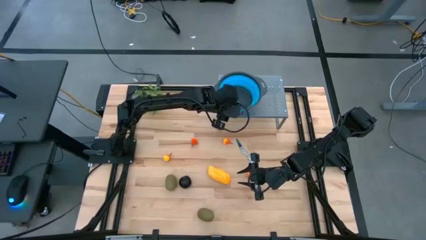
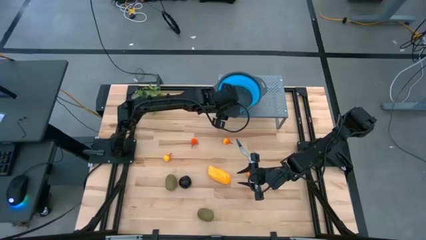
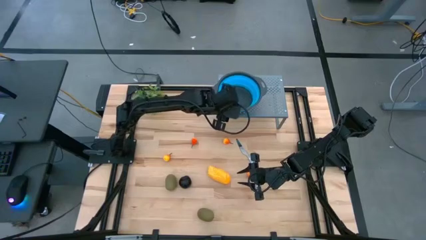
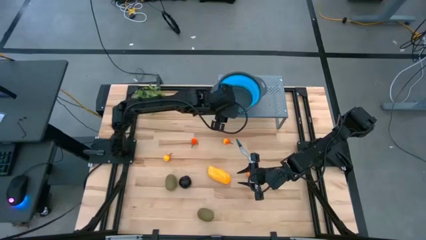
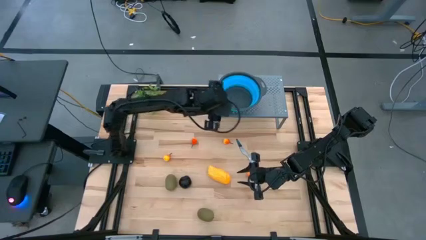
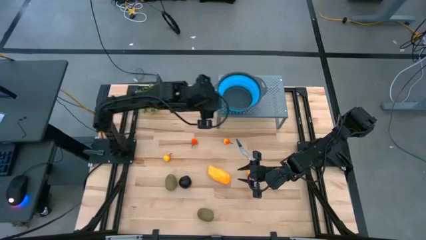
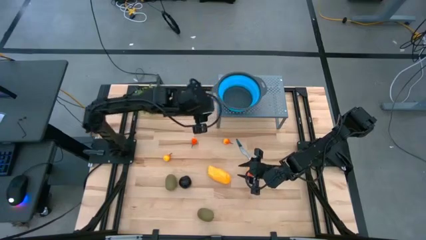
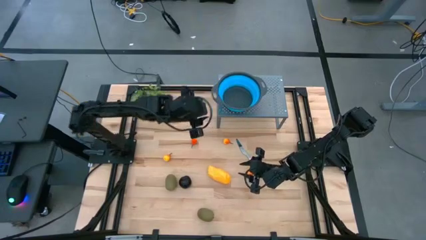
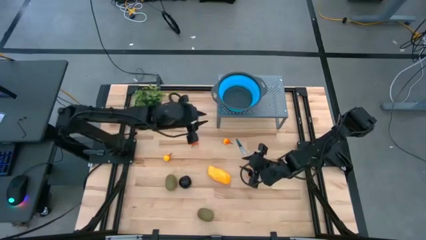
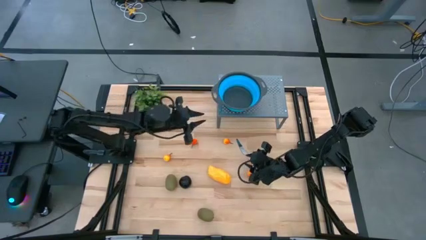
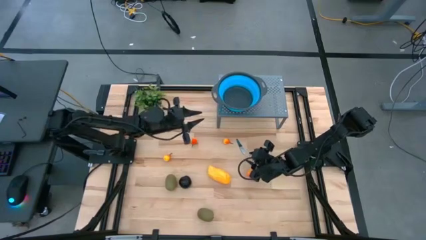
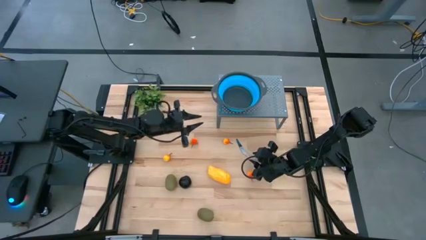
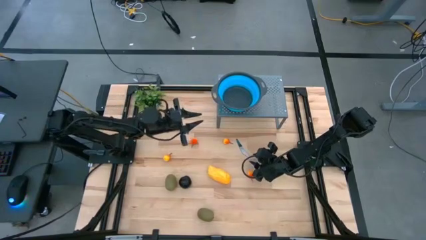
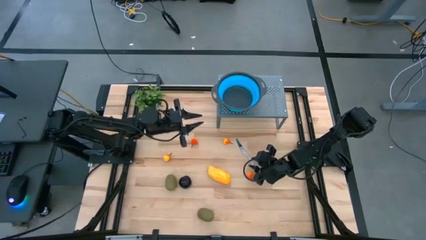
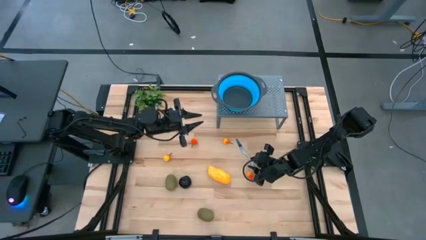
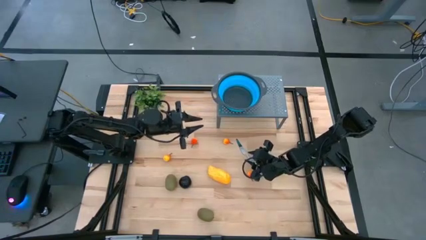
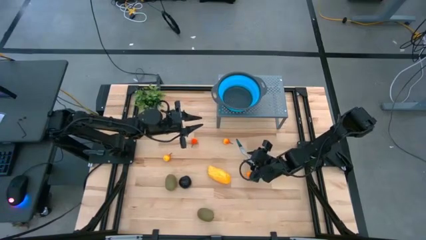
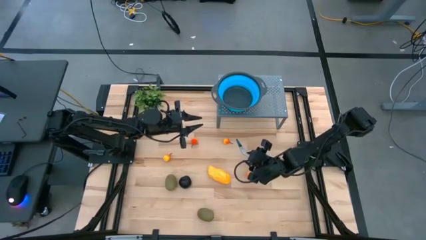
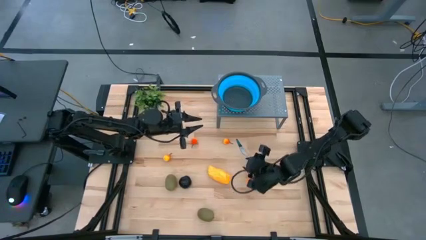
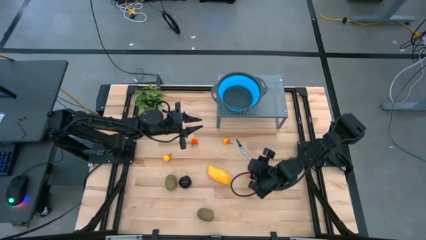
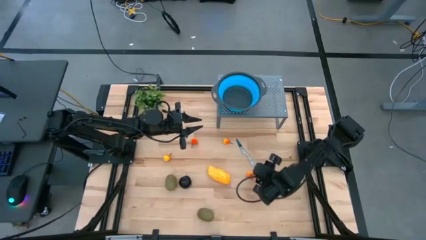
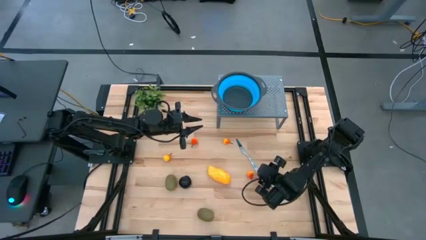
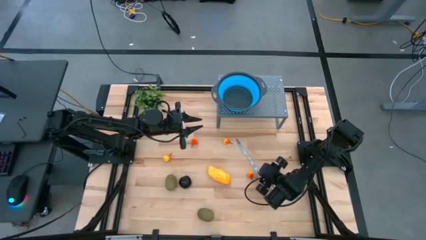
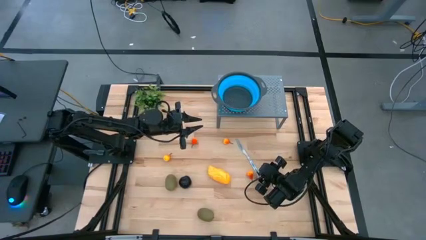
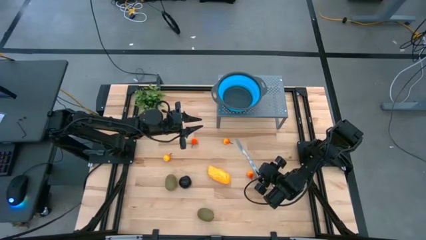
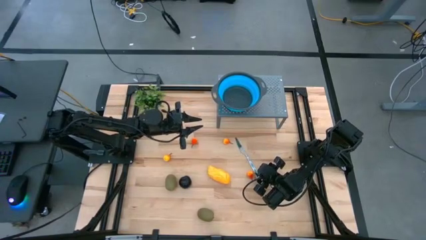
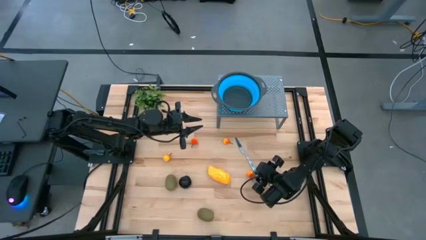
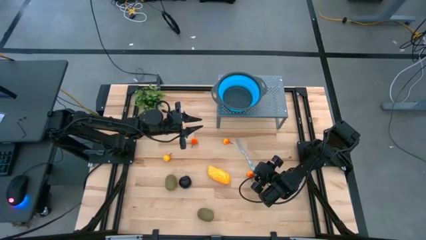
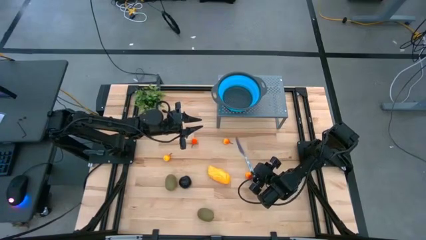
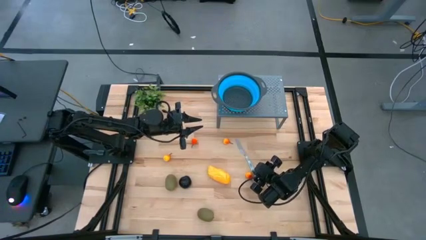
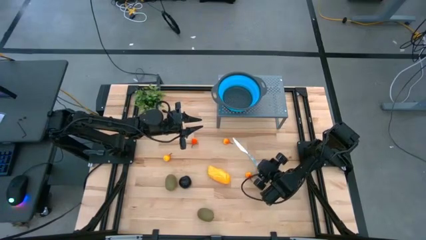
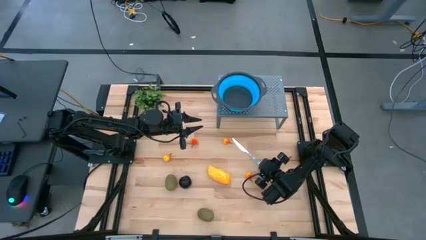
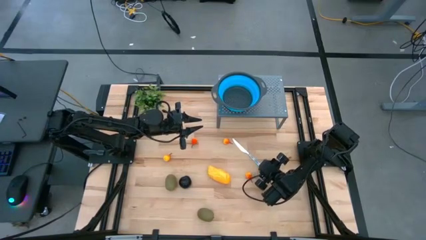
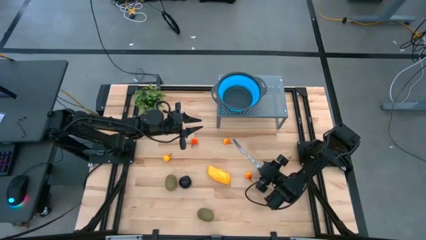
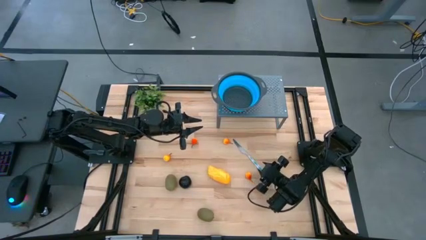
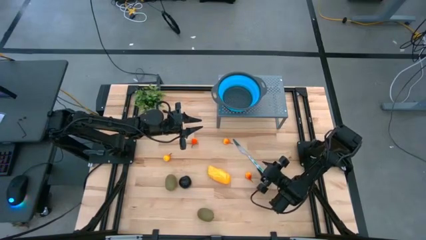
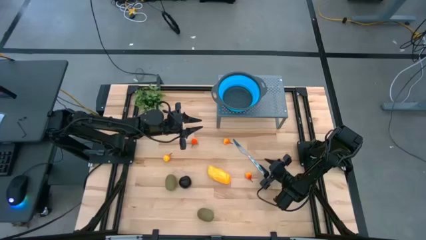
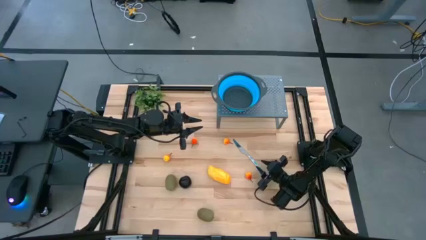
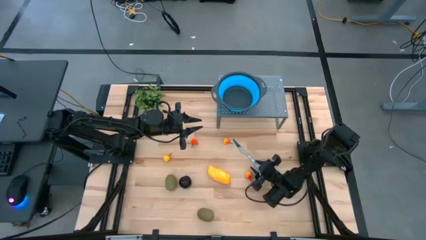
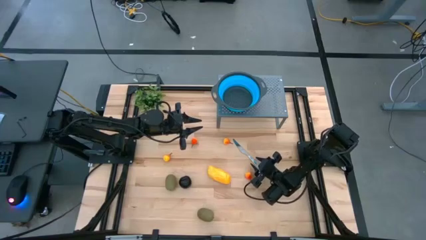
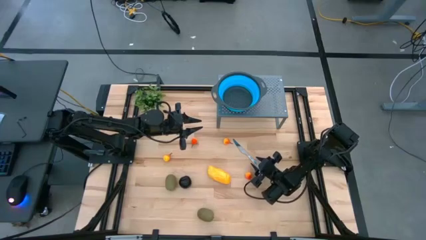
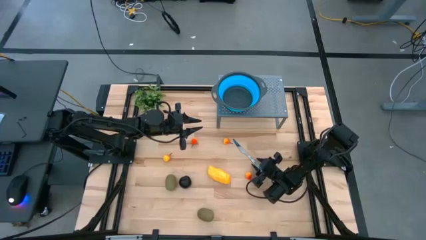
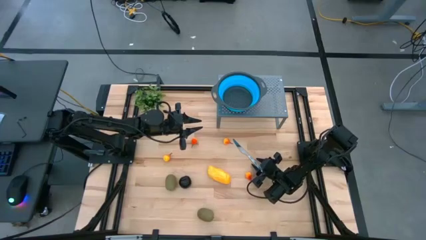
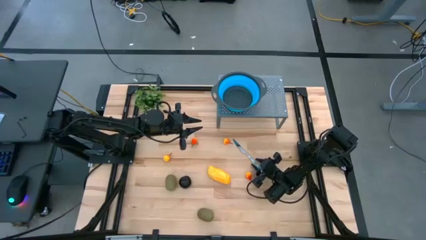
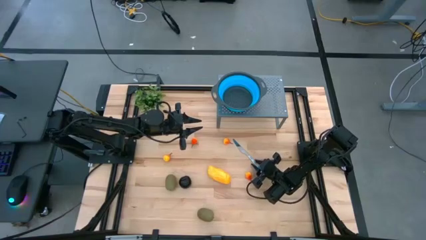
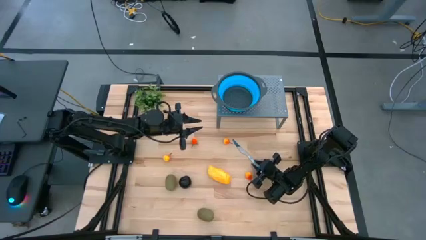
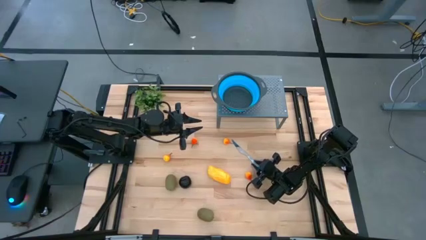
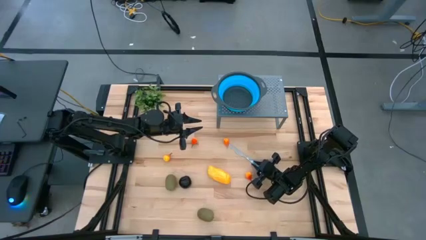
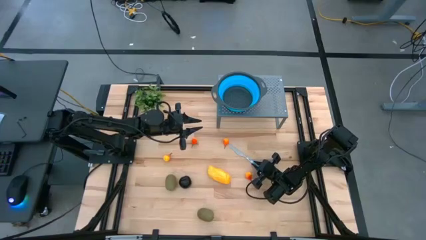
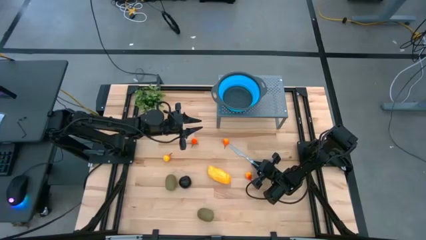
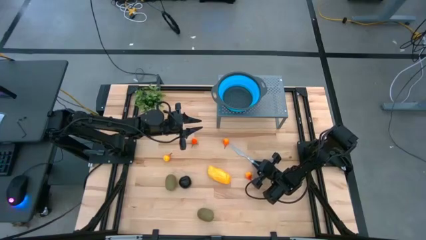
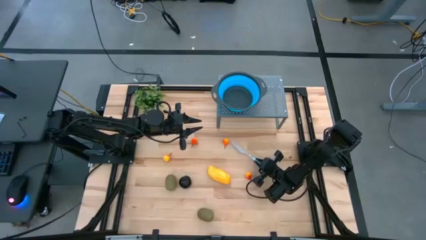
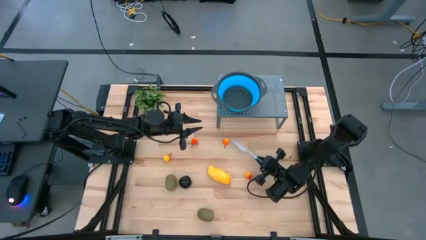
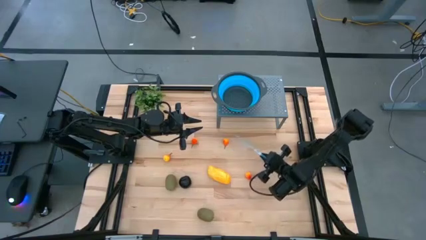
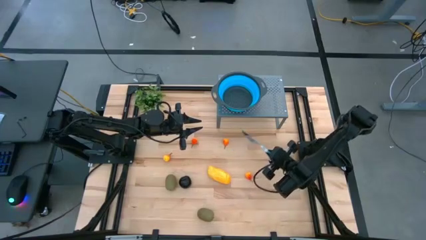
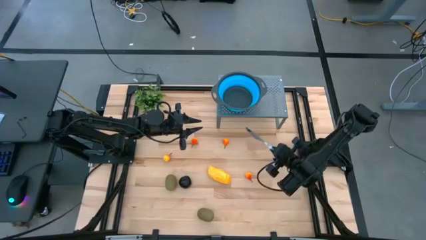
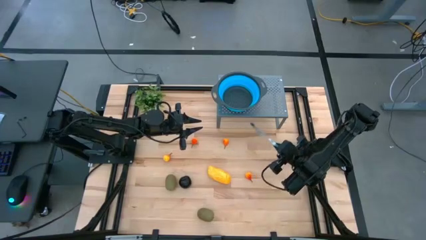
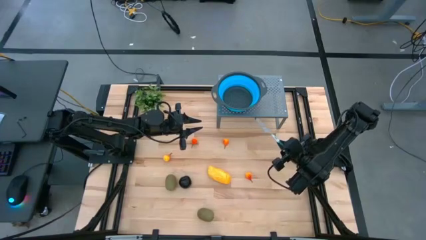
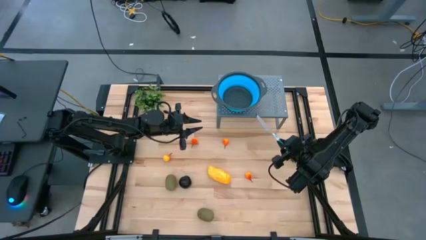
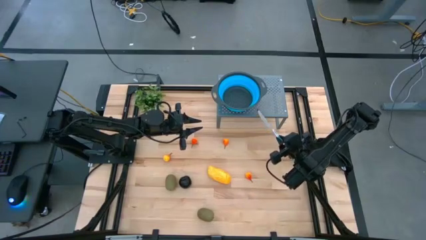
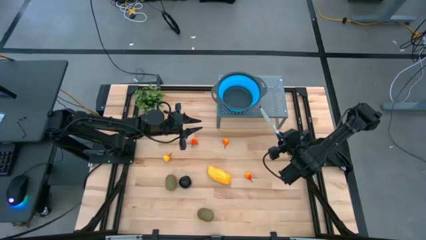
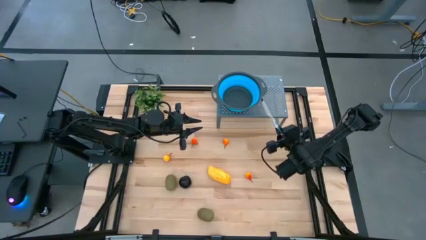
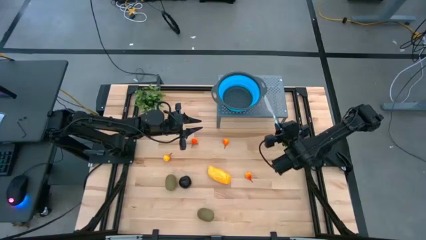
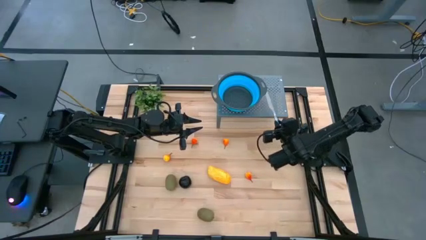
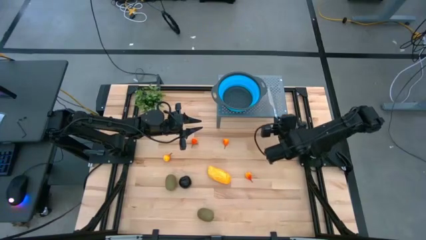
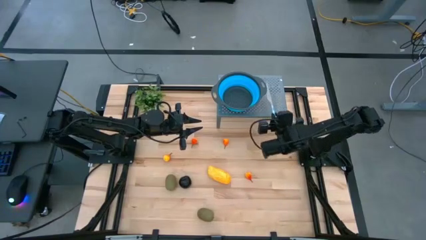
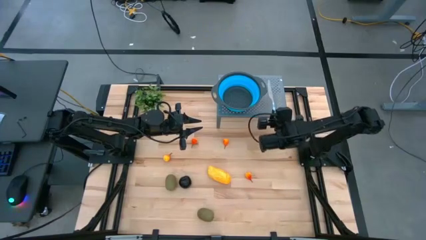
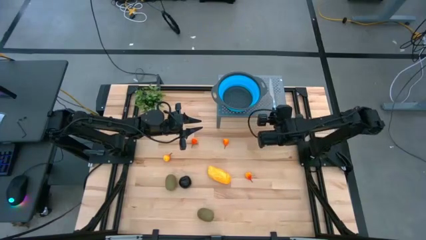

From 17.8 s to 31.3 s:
Task: Pick & Place Fruit
Put the blue knife on the shelf
